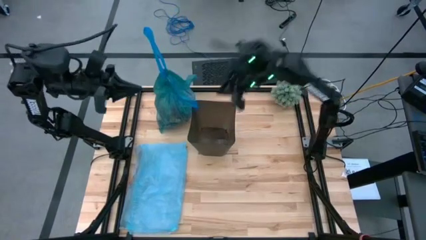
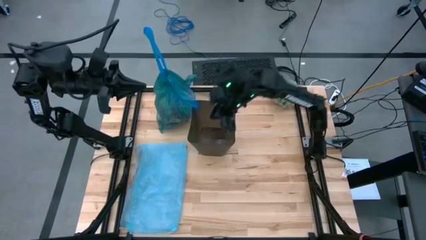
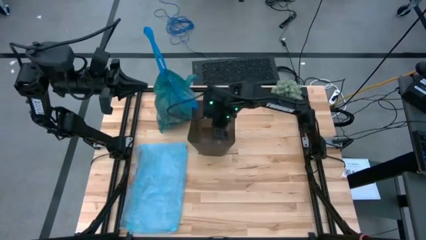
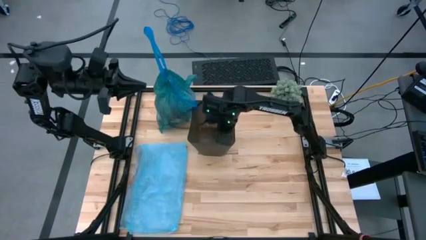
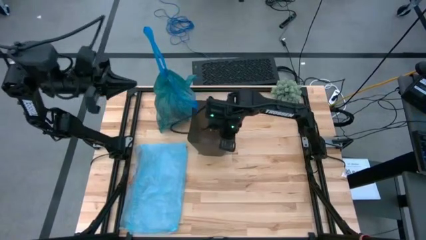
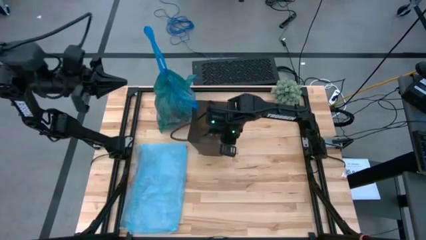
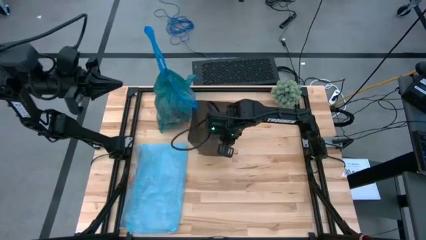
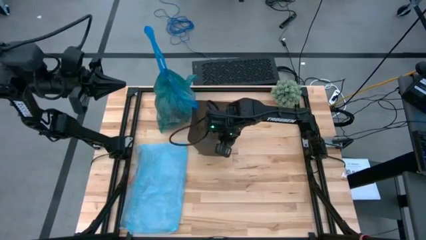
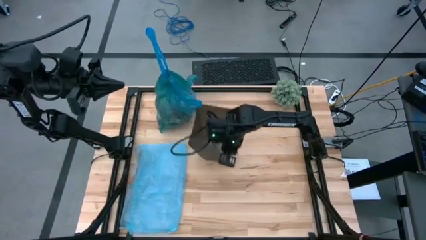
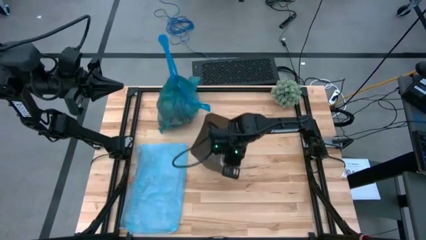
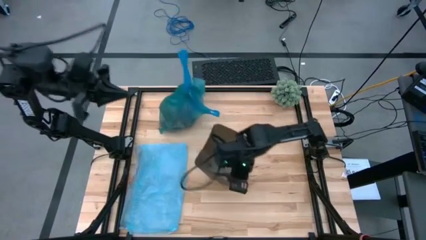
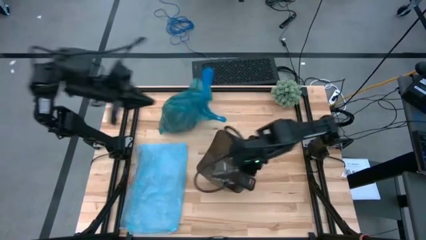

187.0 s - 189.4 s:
Task: place trash/remove bag and relplace
Adjust the trash bin

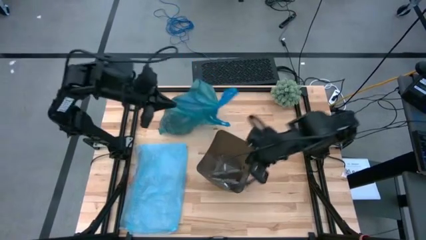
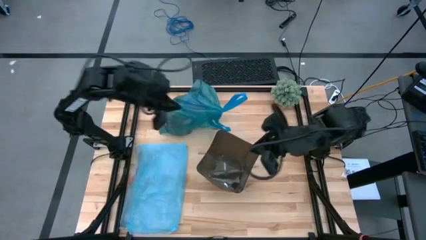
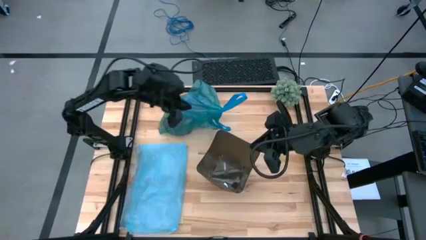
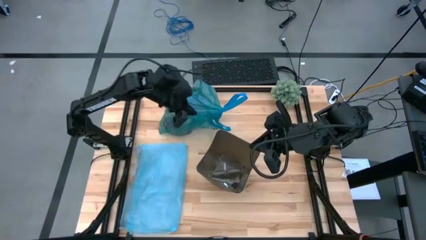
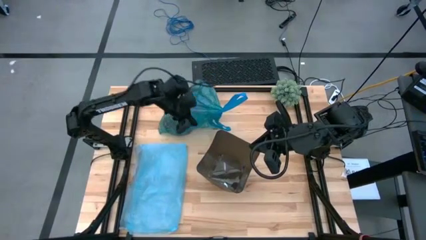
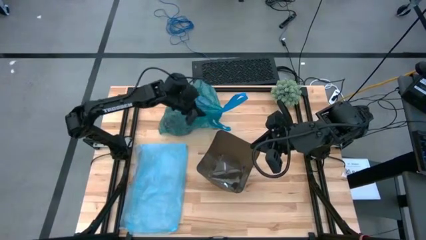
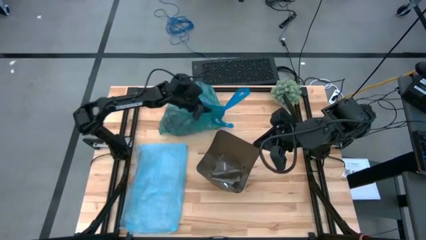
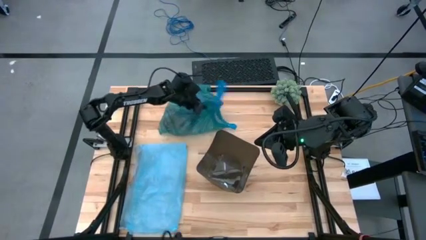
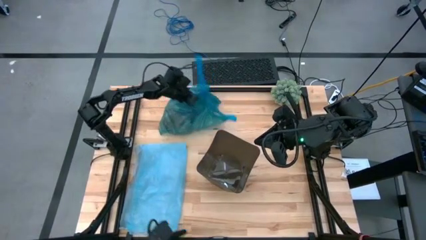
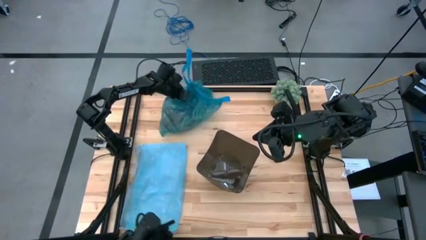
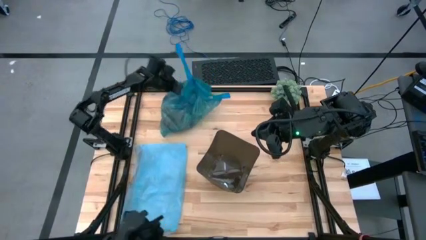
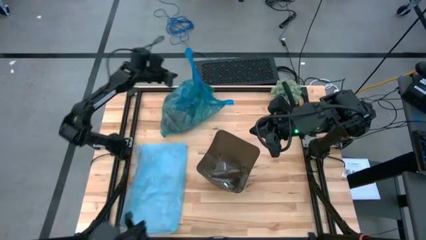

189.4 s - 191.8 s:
Adjust the trash bag

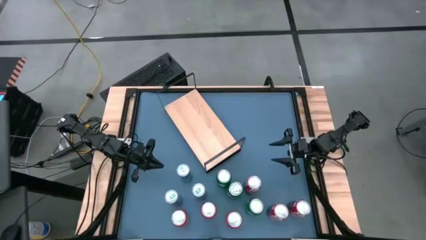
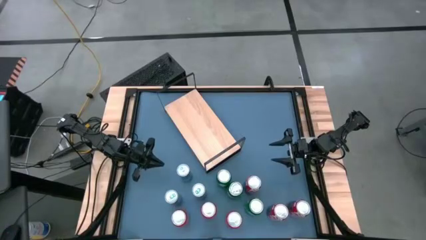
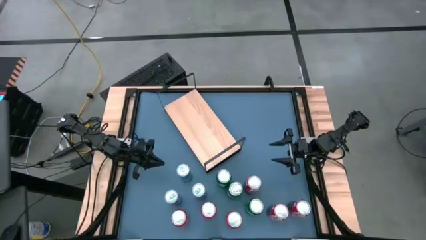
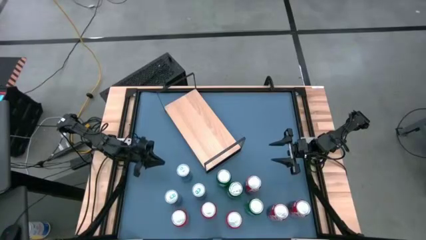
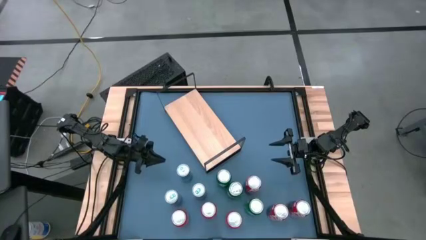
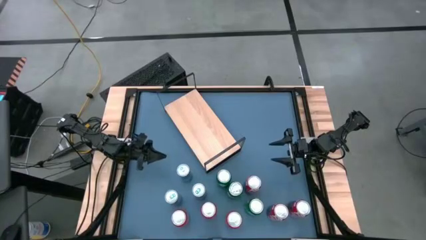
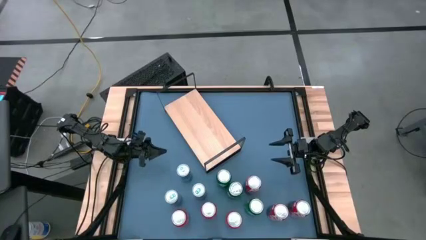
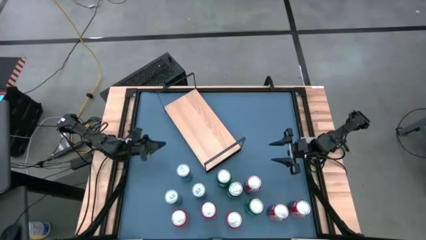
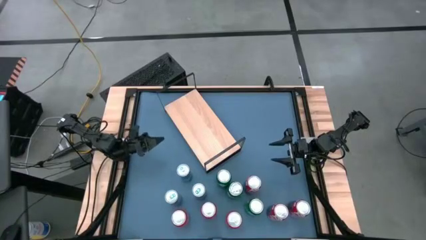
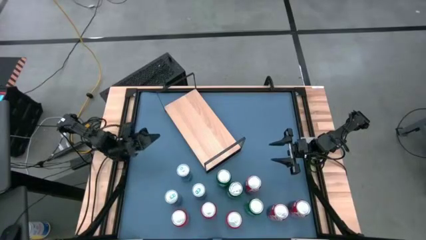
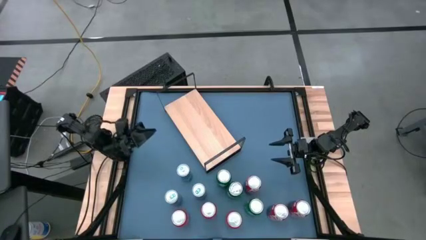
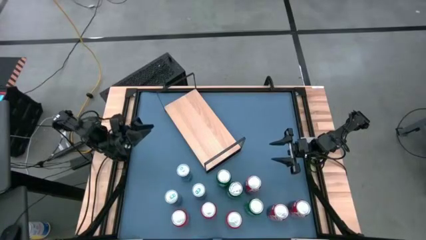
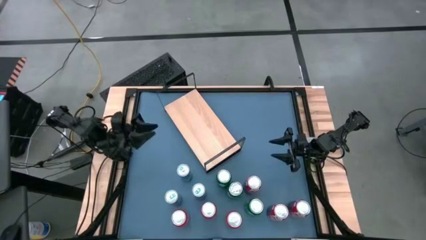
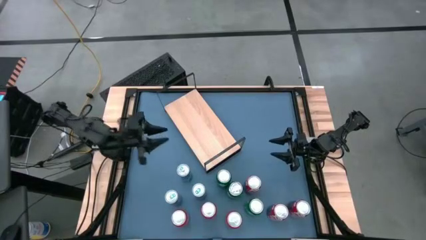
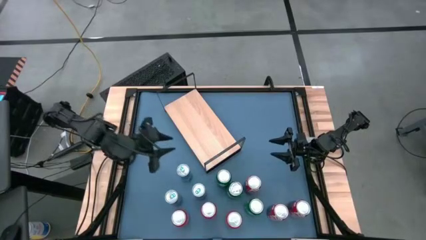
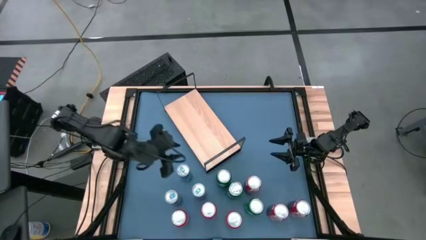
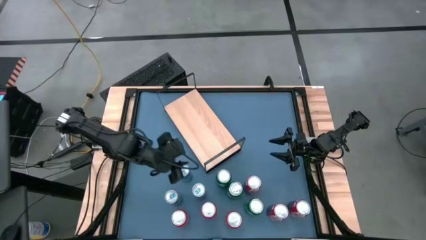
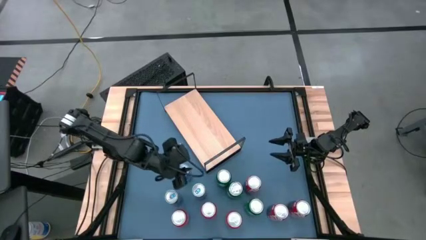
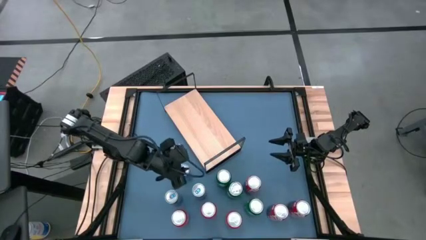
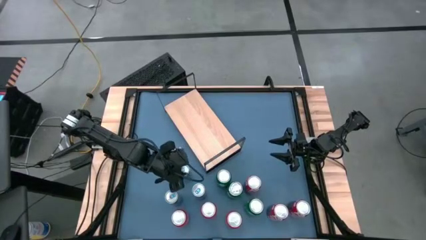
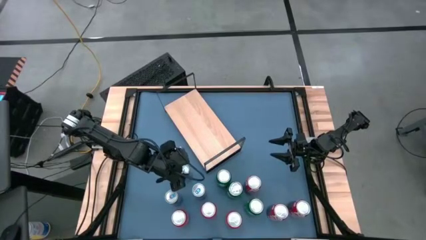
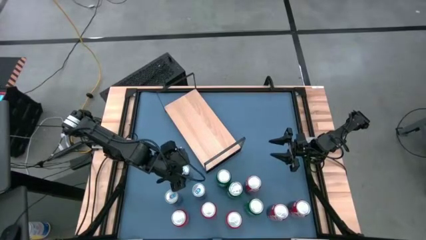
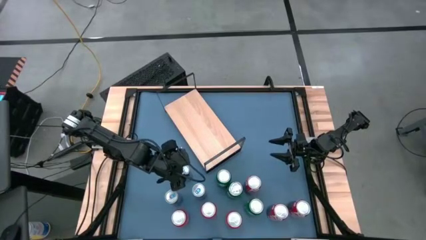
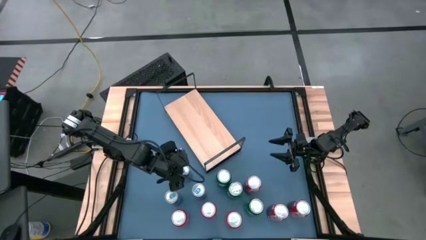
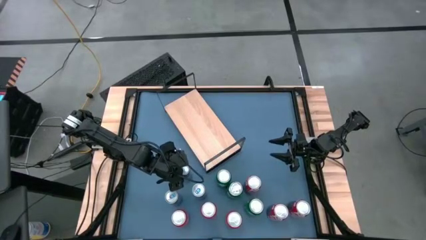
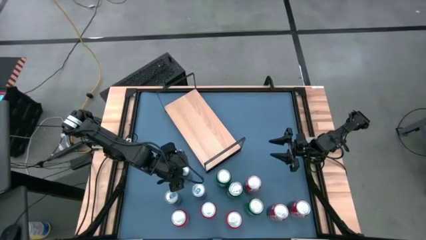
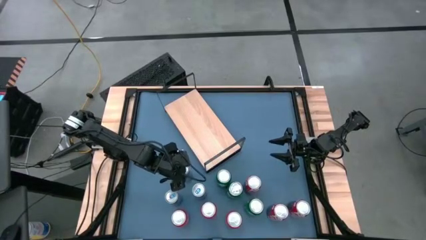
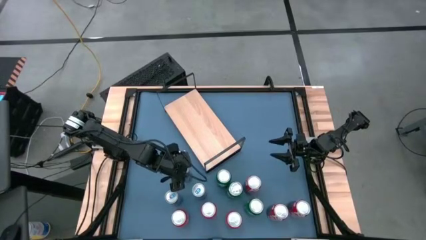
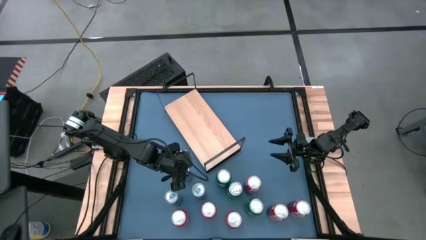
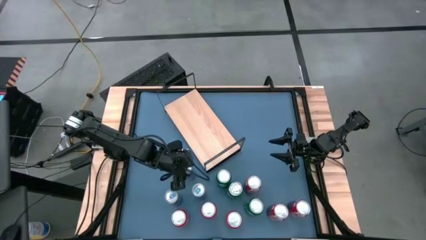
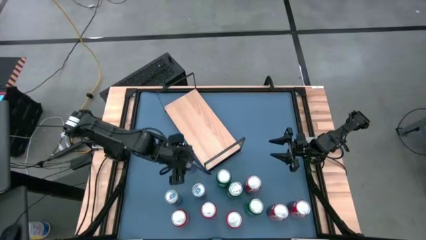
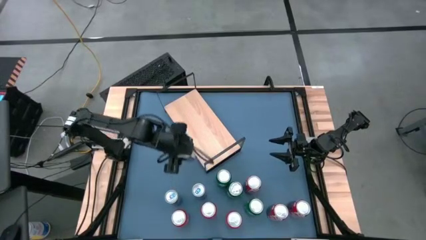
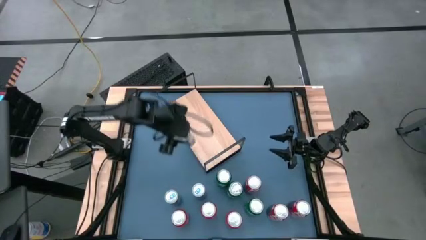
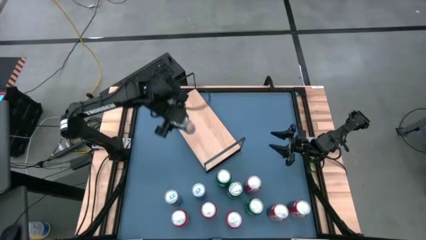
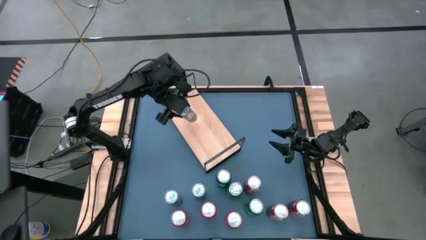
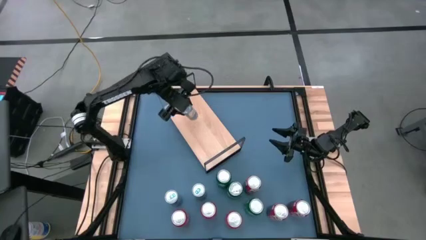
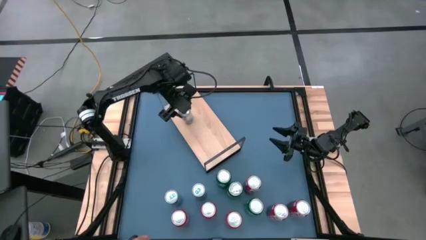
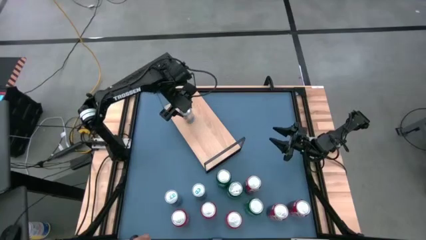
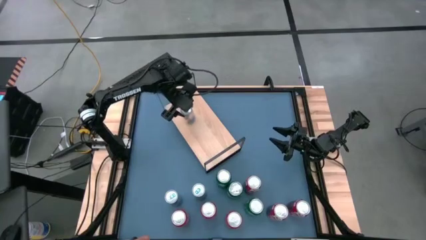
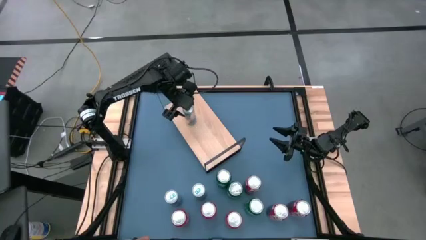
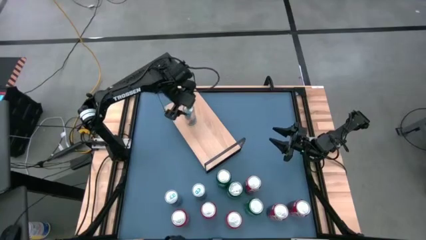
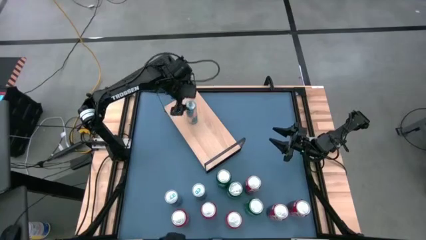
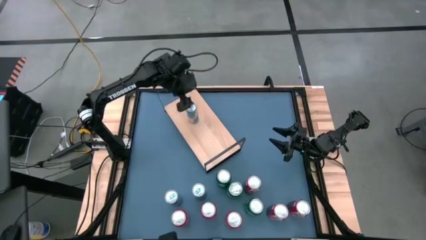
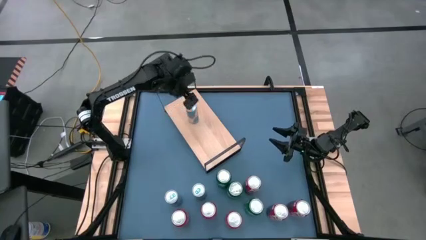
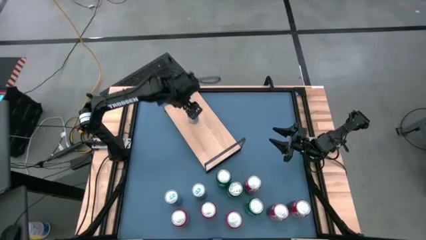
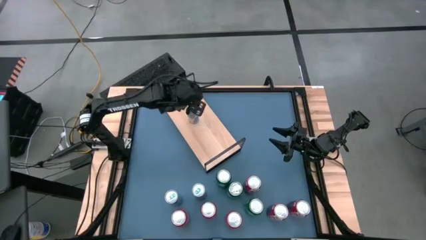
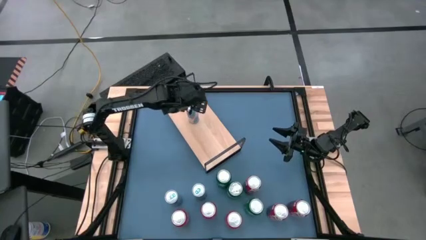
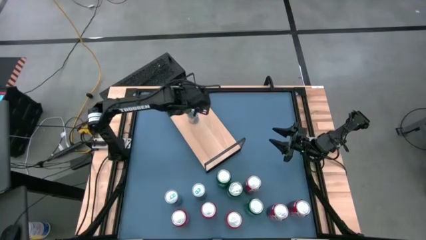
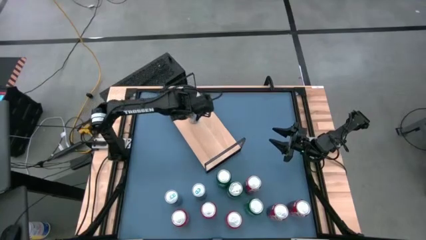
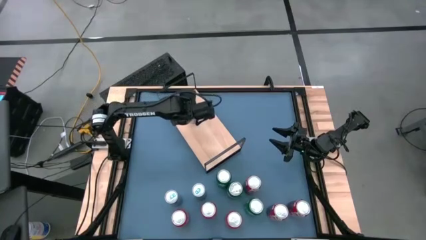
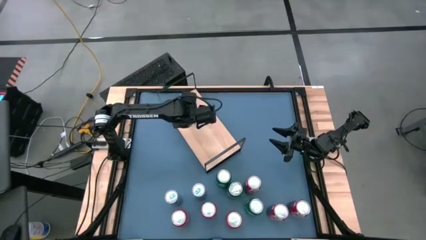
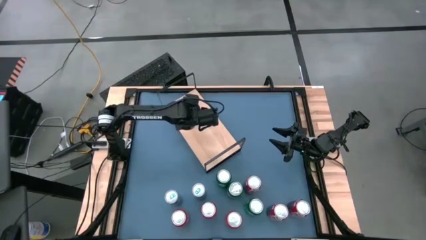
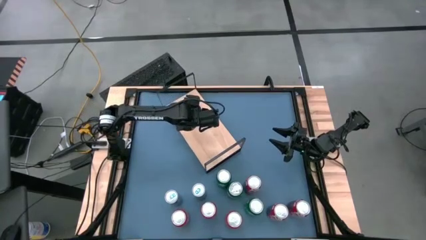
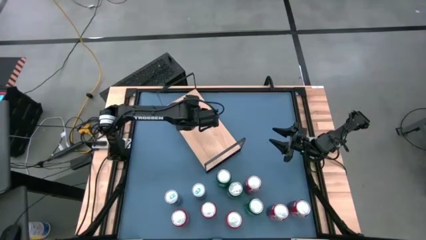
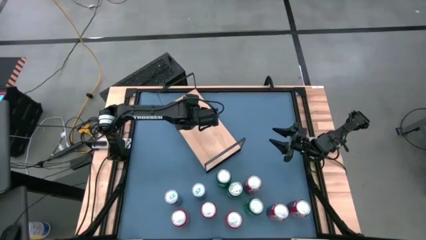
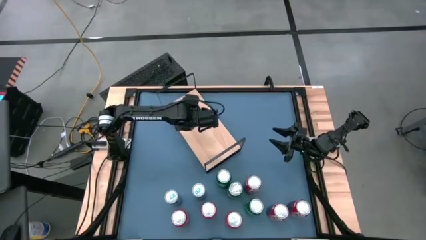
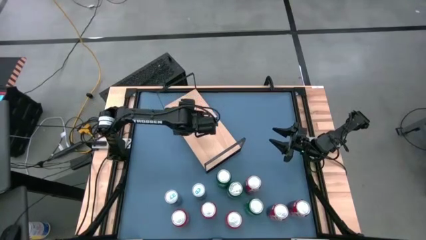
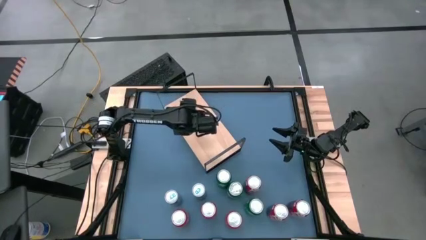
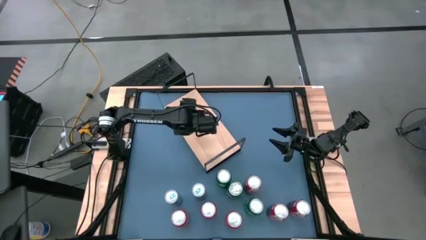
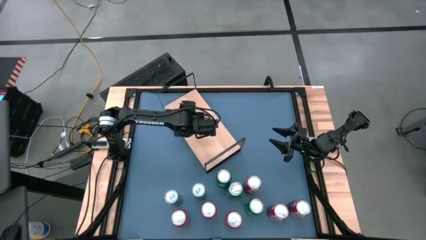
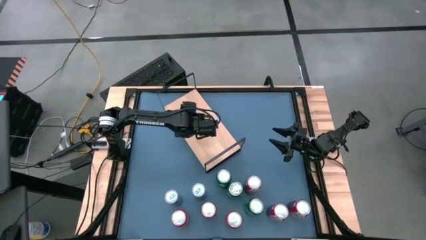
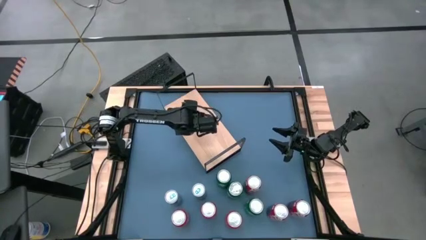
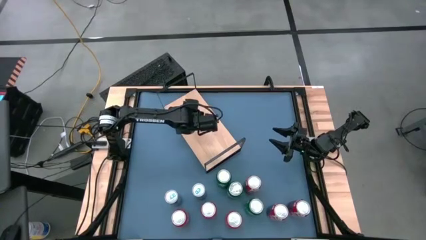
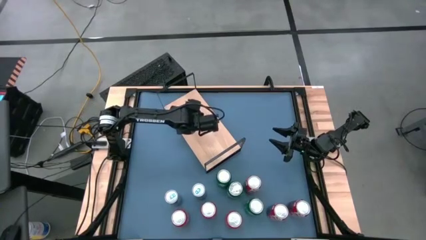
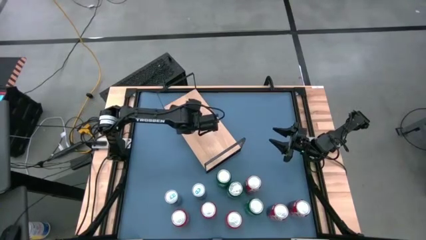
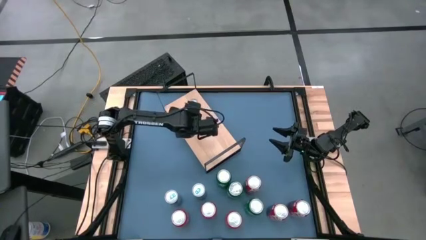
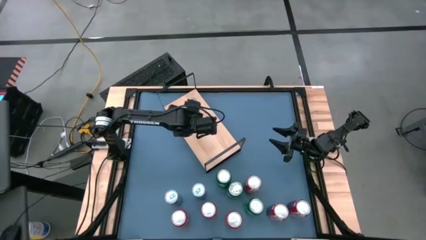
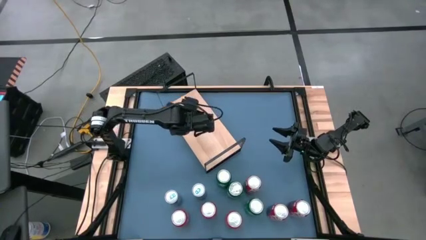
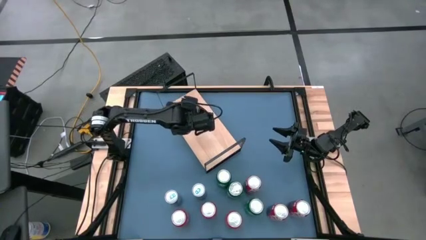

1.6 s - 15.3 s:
Task: Place canned beverage on shelf
Put the top right blue soda can on the shelf
